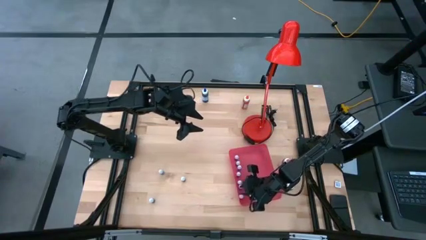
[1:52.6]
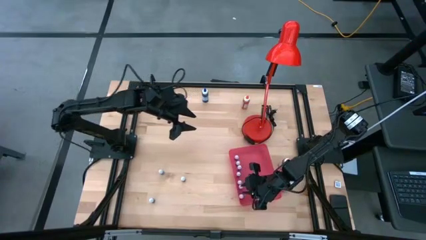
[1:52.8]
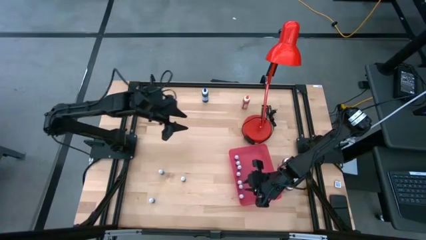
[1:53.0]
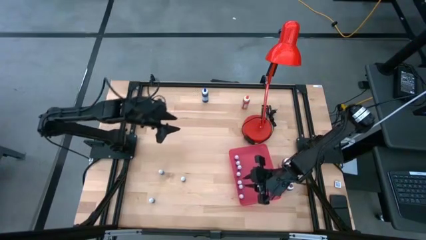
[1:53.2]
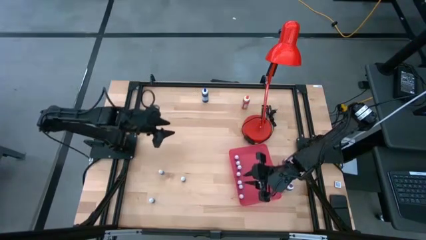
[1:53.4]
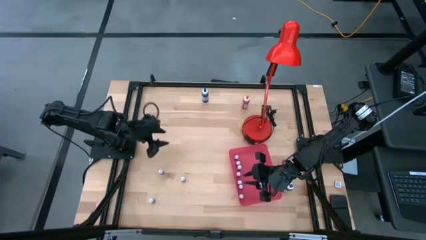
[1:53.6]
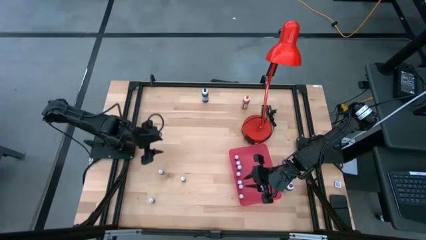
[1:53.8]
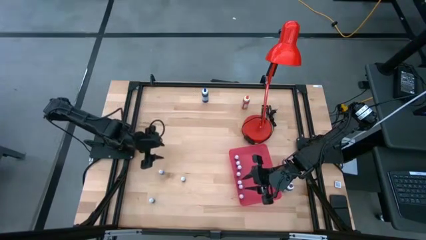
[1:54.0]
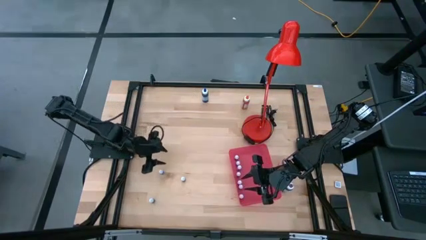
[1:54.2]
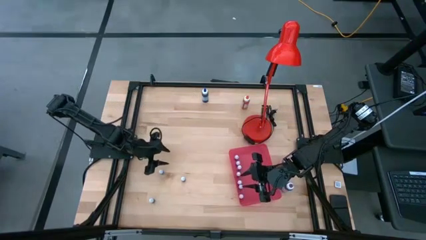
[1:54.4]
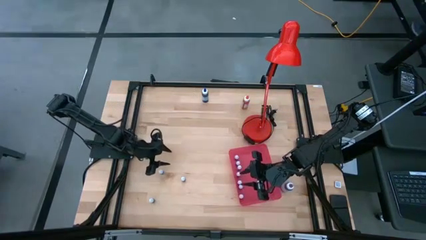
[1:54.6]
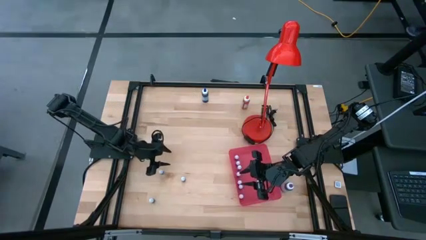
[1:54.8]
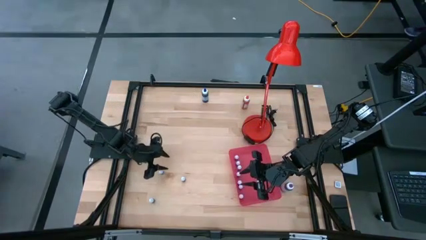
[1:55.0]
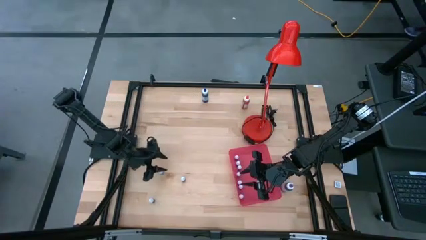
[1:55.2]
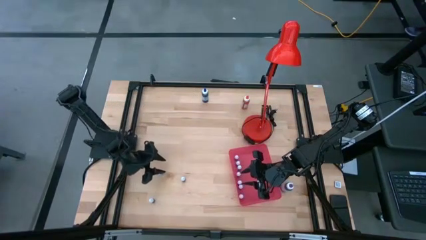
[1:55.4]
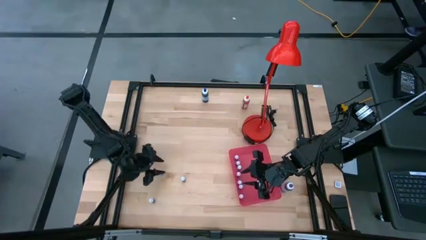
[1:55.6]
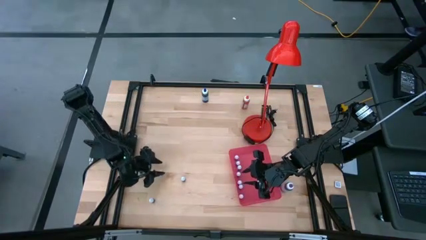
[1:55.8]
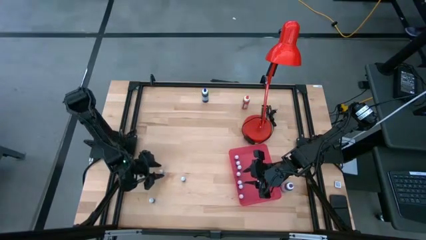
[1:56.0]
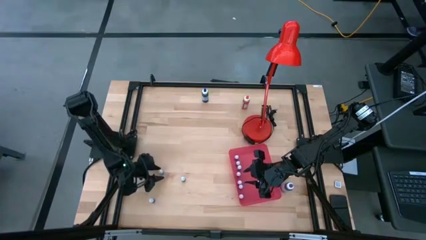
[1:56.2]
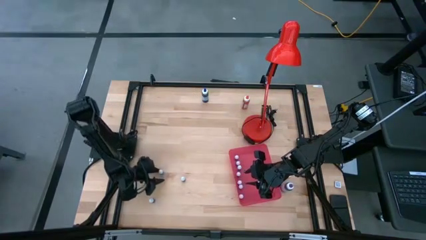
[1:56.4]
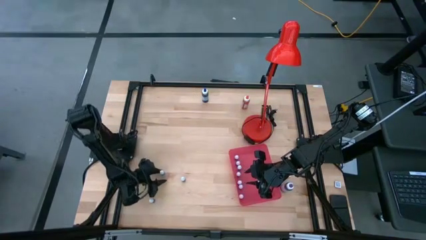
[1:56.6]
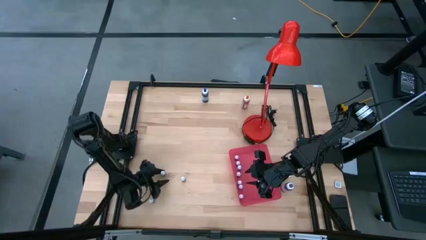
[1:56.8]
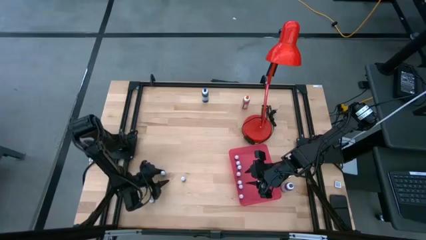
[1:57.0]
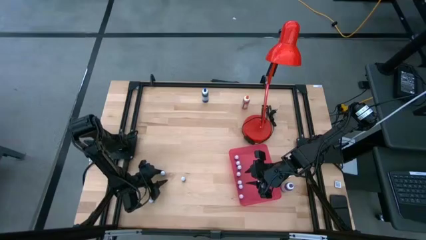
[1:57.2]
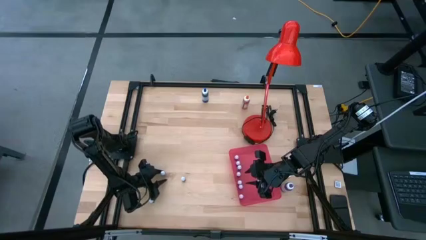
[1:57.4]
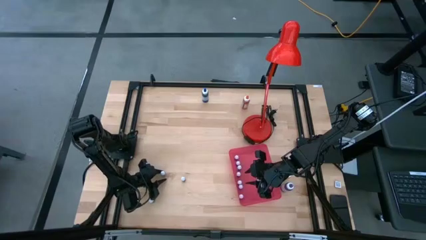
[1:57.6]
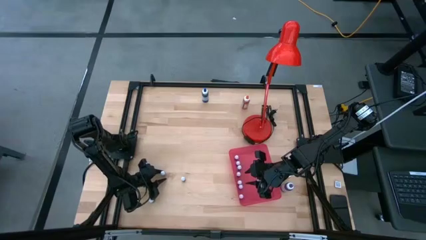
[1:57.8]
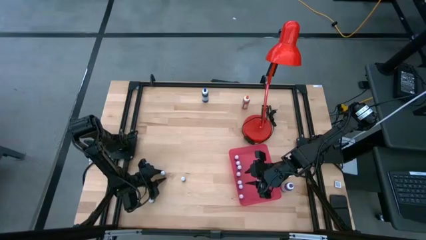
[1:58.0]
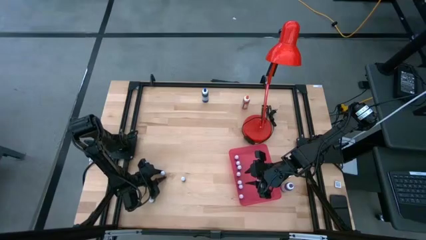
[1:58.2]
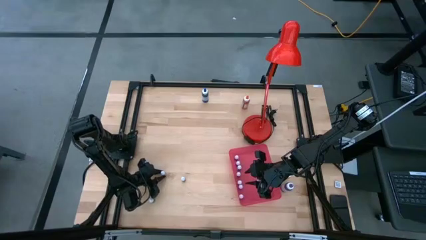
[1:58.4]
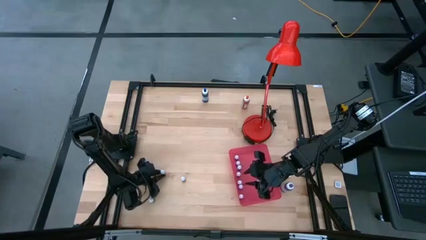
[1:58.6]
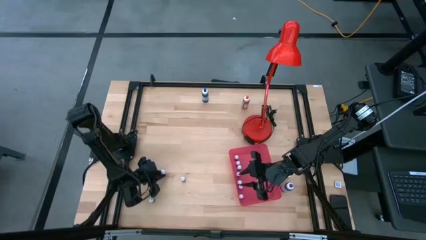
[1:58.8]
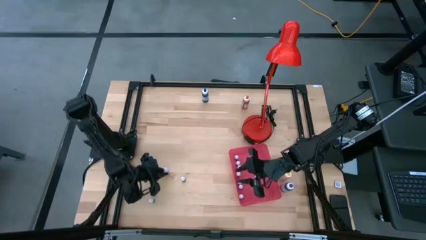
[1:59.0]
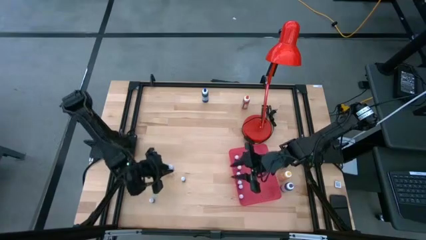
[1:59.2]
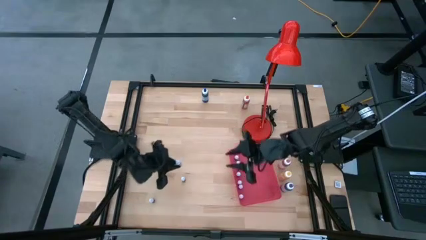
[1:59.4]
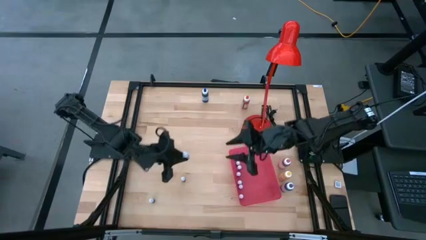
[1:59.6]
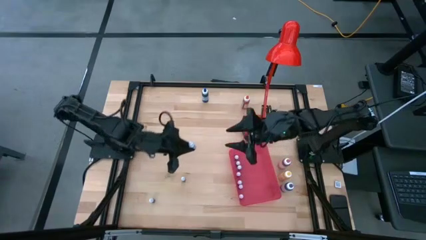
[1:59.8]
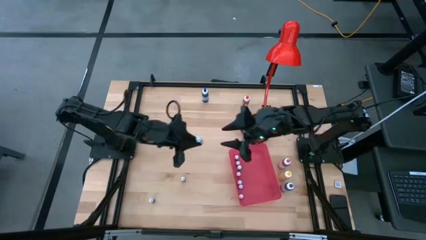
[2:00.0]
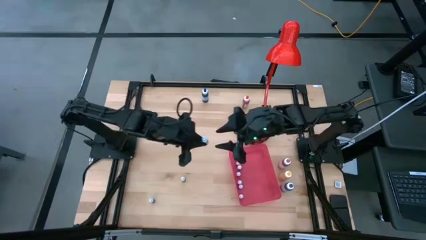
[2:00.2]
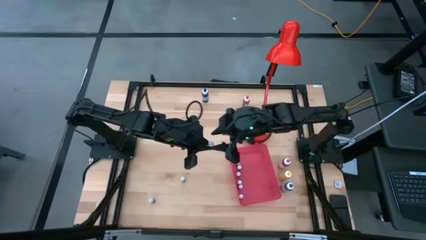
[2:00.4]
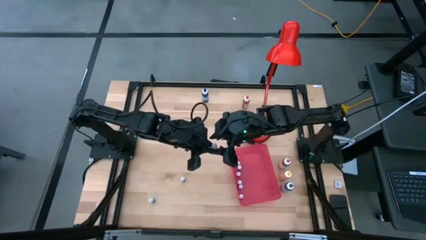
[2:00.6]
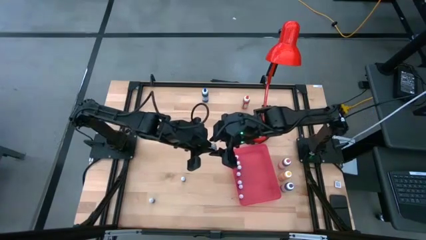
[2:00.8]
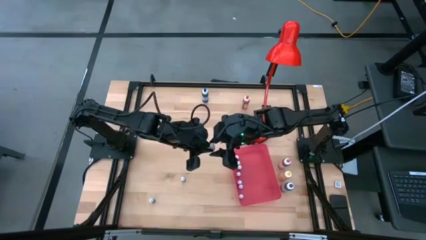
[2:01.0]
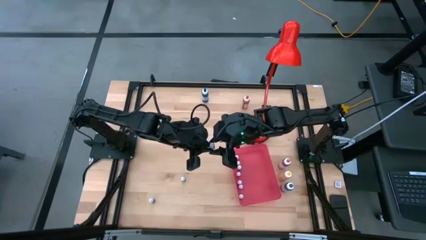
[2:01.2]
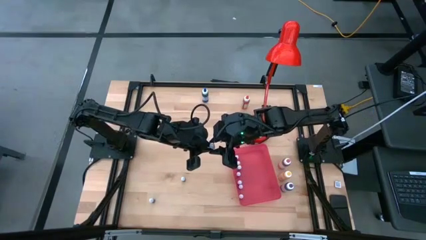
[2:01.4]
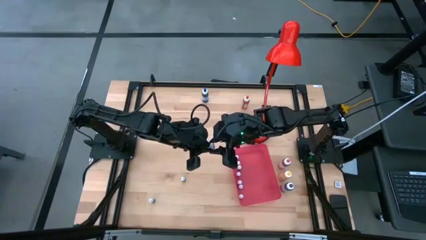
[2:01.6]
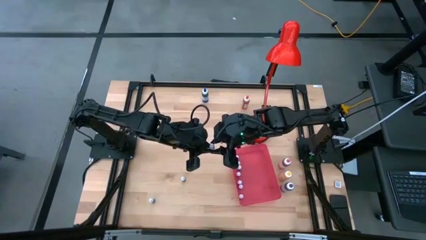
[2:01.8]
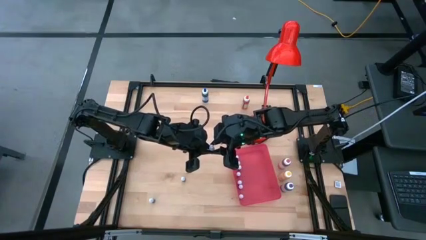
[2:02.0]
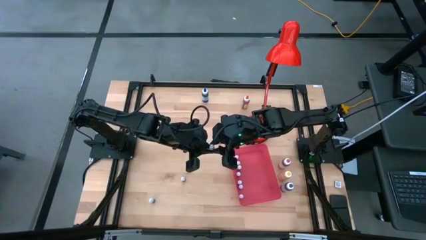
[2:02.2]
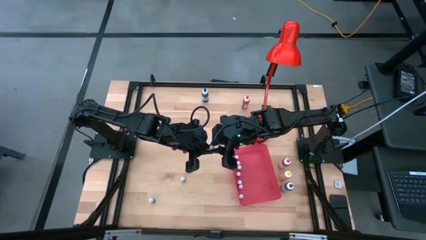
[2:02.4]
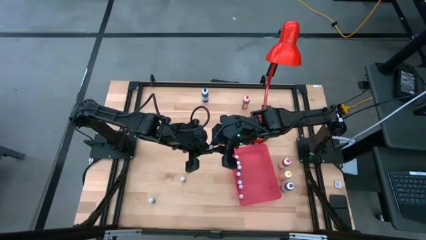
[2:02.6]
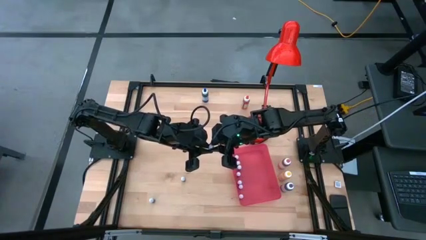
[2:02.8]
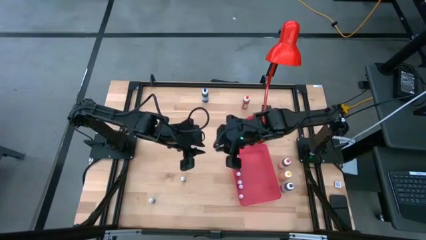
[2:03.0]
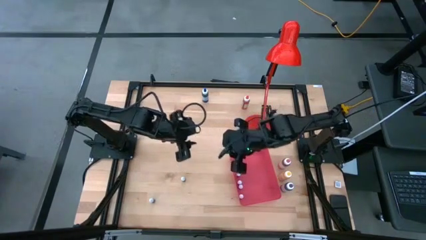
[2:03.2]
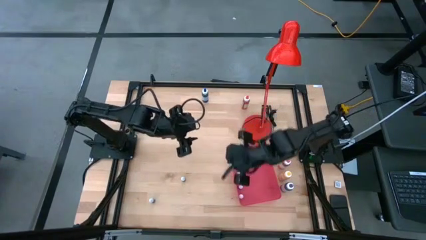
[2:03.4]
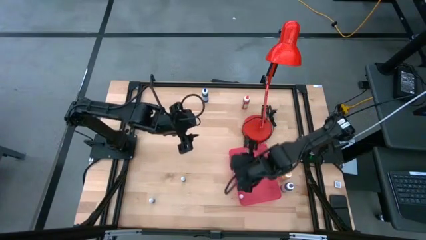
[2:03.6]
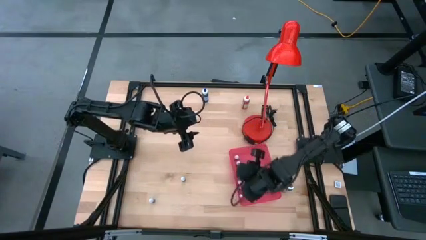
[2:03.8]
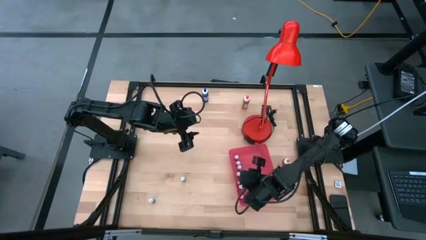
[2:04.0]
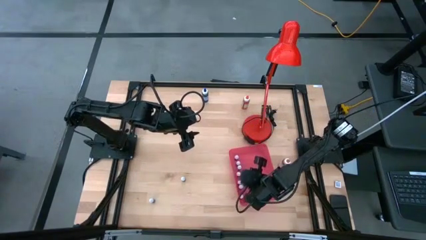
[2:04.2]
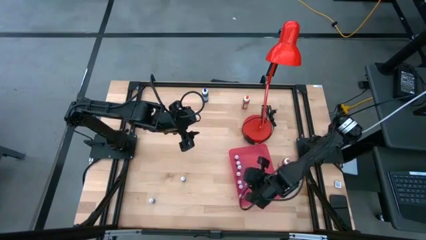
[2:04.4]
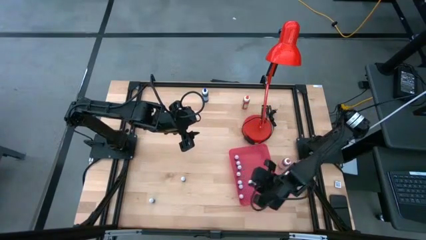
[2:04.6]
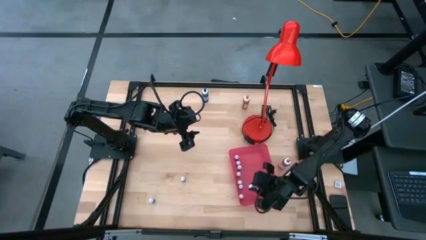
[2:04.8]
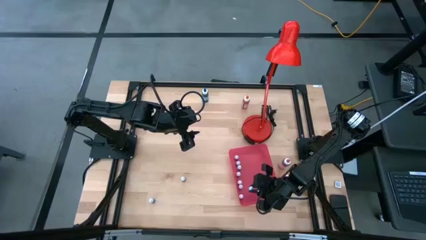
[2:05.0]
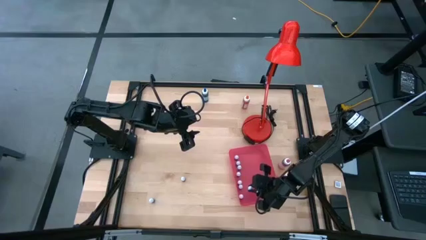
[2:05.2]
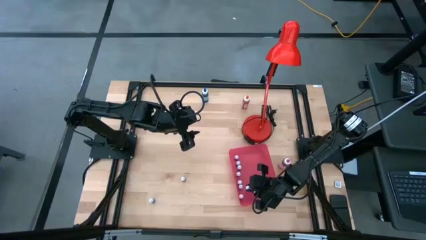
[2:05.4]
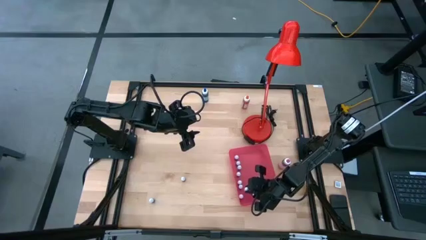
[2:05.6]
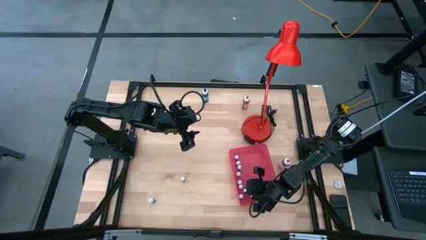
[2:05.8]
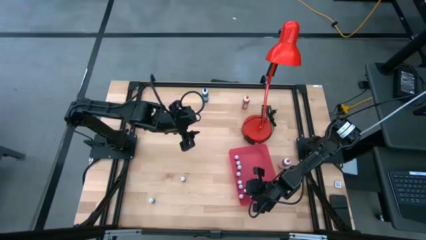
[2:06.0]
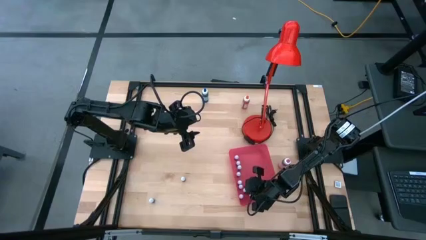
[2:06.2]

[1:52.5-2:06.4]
Task: Pick & Place food coloring
Put the small blue food coloring bottle into the red bin
